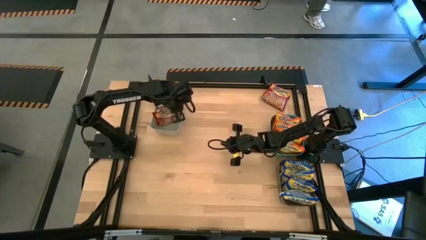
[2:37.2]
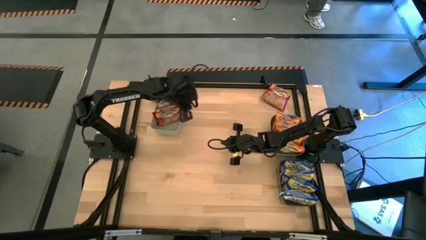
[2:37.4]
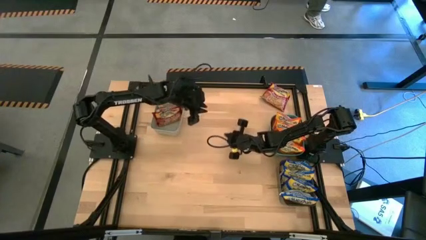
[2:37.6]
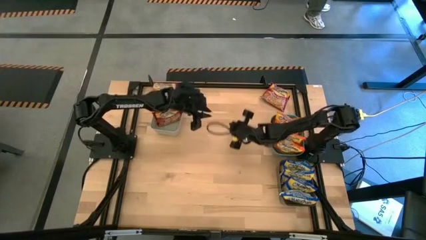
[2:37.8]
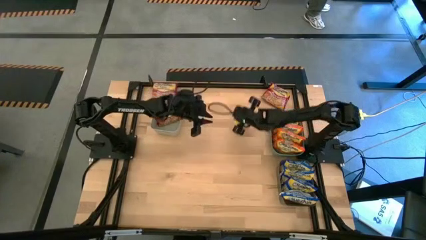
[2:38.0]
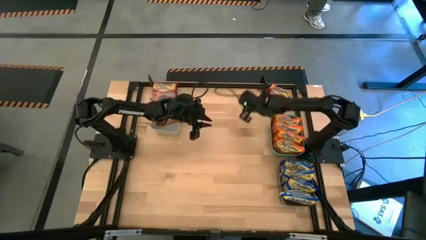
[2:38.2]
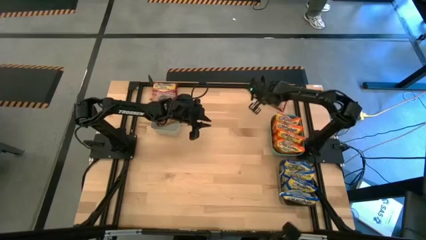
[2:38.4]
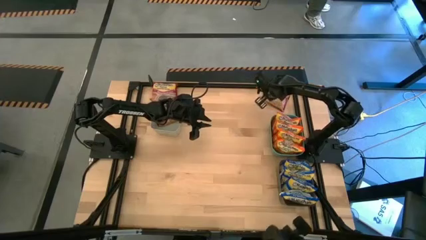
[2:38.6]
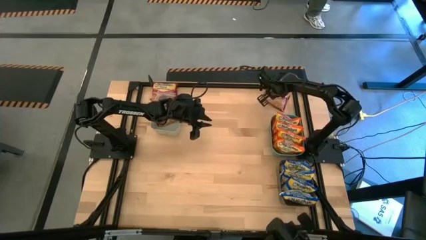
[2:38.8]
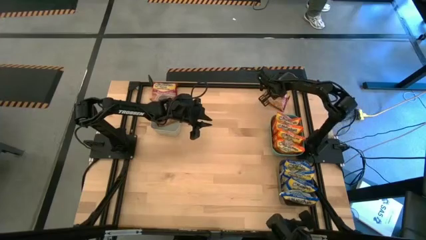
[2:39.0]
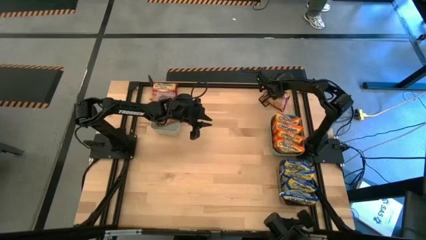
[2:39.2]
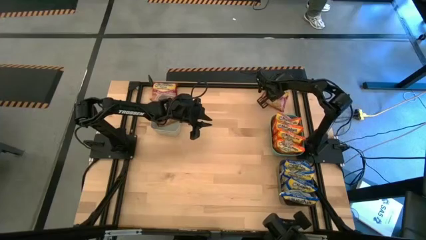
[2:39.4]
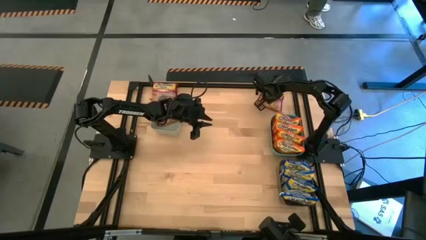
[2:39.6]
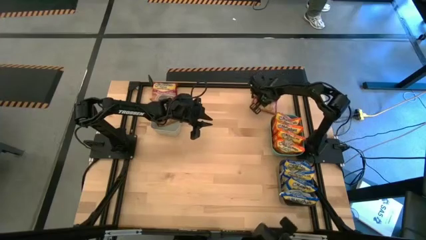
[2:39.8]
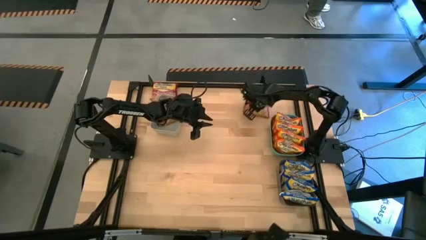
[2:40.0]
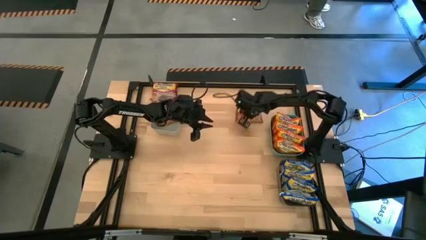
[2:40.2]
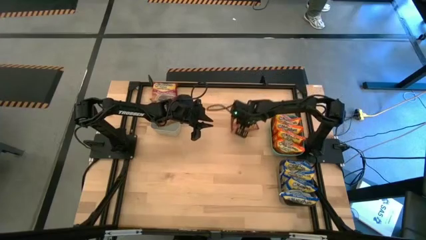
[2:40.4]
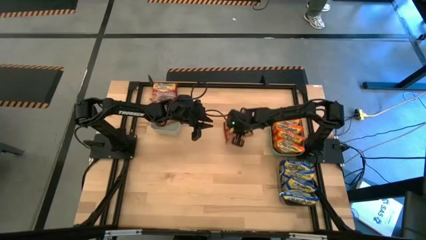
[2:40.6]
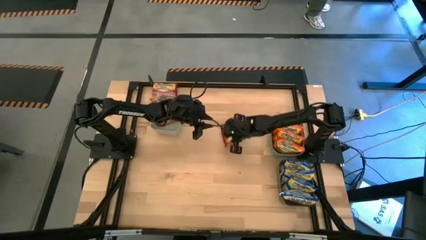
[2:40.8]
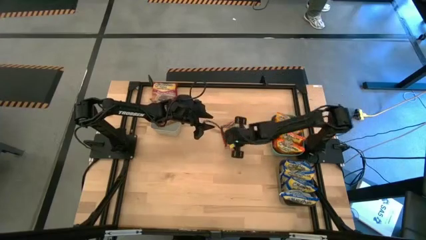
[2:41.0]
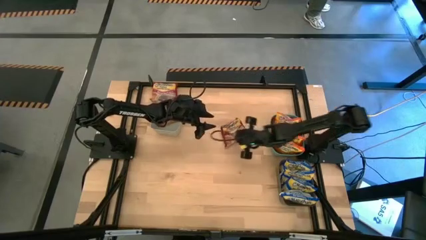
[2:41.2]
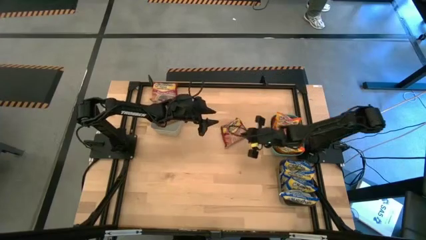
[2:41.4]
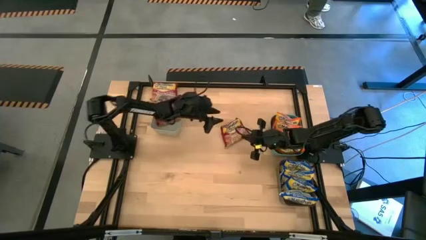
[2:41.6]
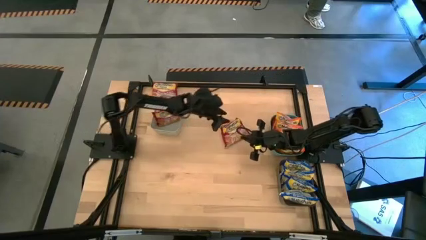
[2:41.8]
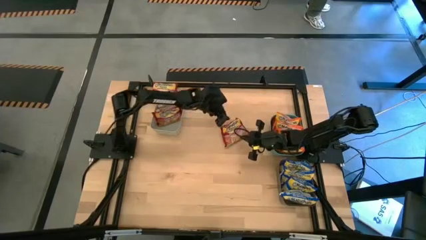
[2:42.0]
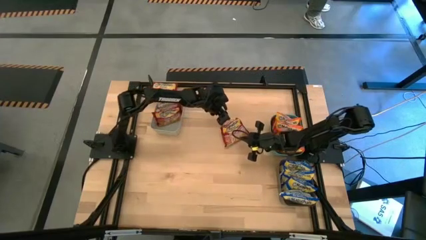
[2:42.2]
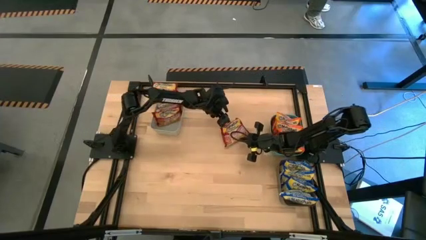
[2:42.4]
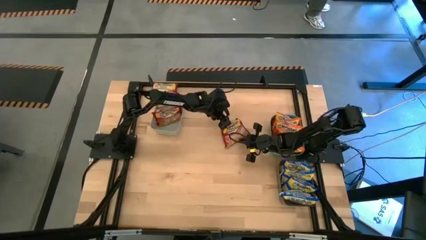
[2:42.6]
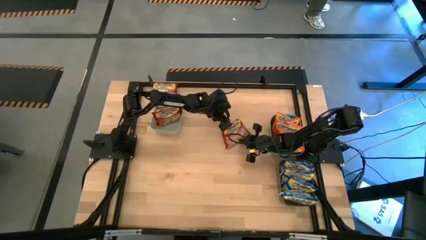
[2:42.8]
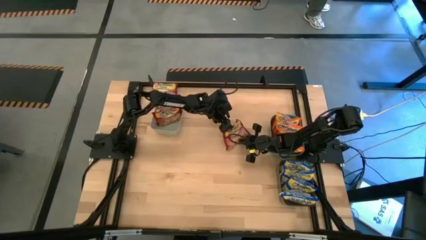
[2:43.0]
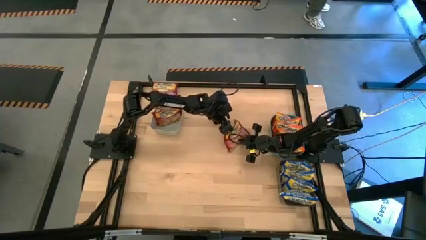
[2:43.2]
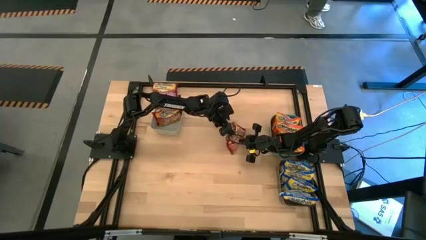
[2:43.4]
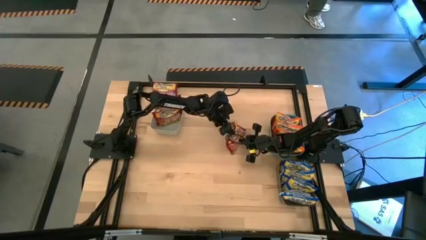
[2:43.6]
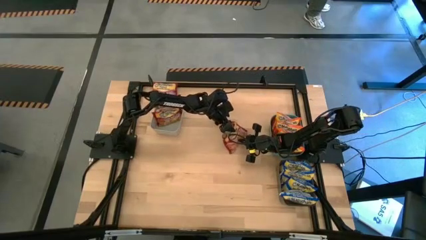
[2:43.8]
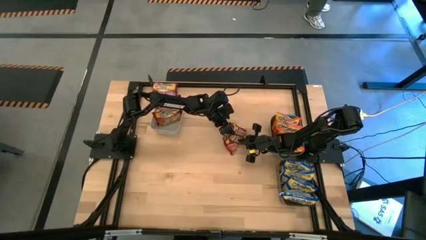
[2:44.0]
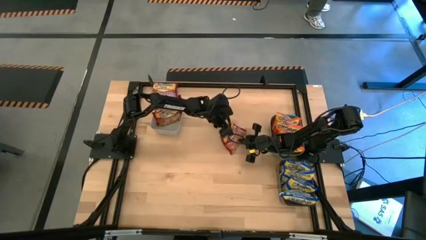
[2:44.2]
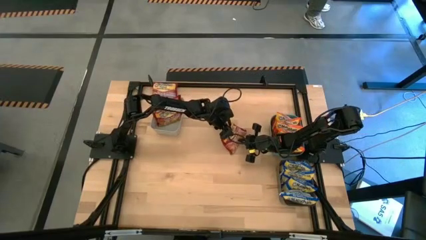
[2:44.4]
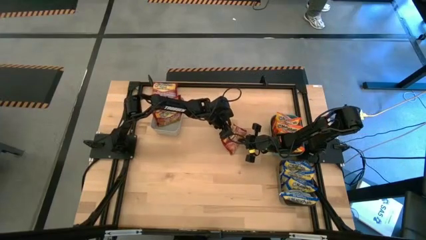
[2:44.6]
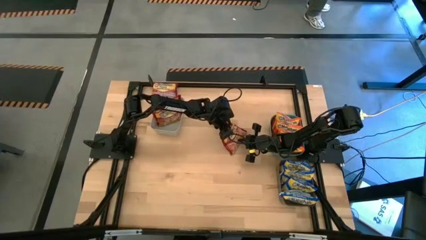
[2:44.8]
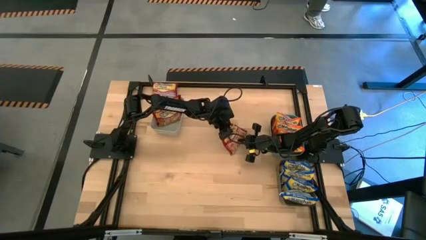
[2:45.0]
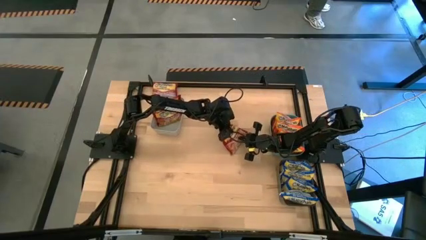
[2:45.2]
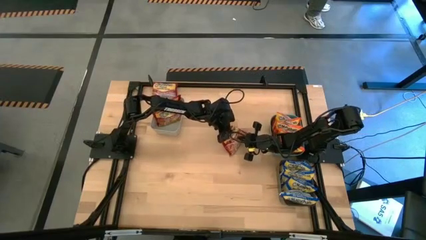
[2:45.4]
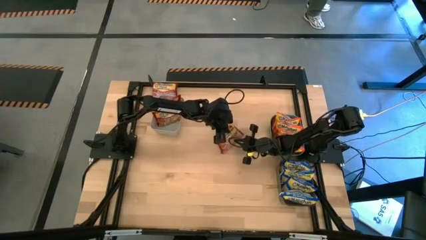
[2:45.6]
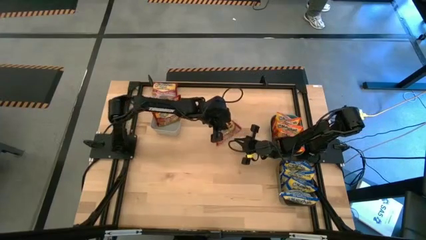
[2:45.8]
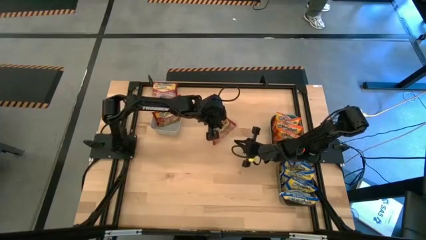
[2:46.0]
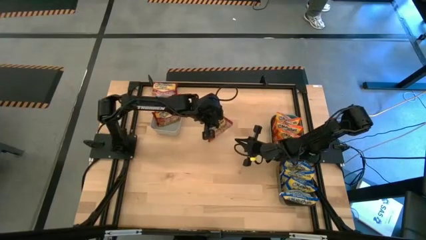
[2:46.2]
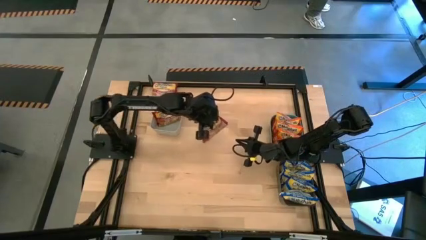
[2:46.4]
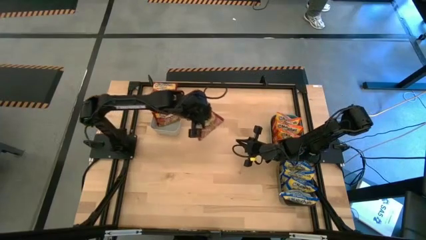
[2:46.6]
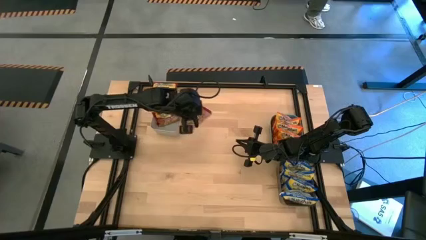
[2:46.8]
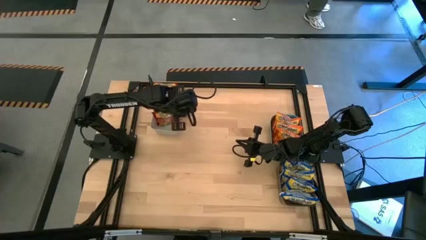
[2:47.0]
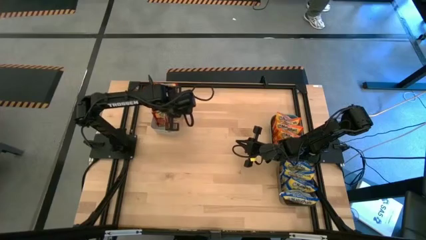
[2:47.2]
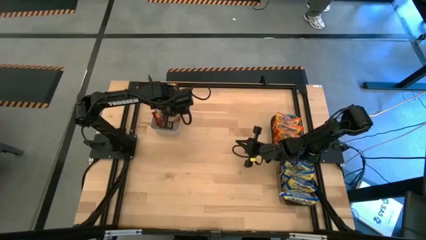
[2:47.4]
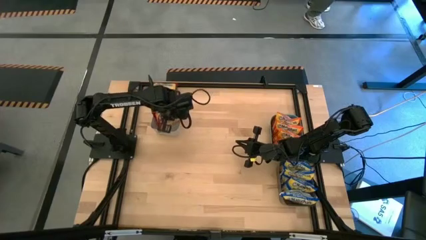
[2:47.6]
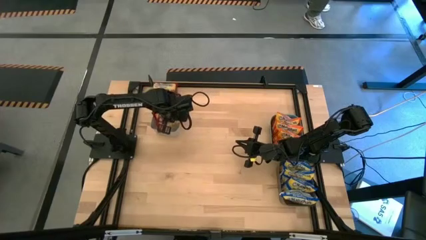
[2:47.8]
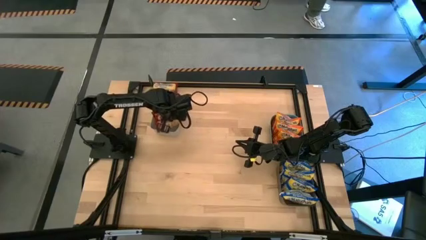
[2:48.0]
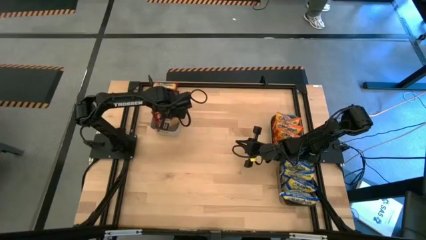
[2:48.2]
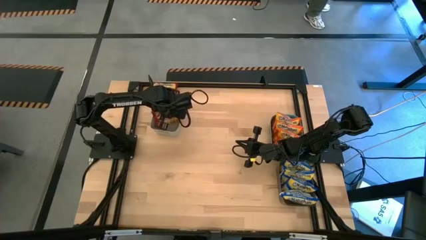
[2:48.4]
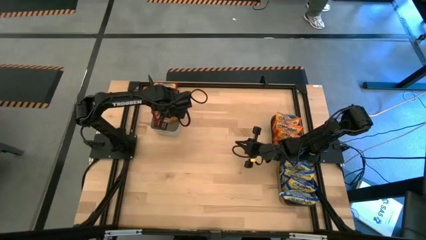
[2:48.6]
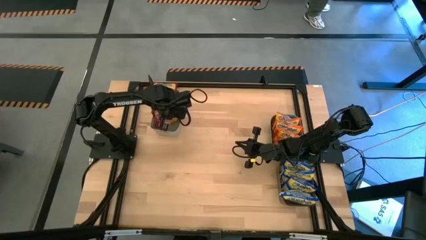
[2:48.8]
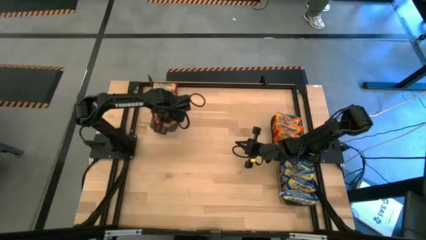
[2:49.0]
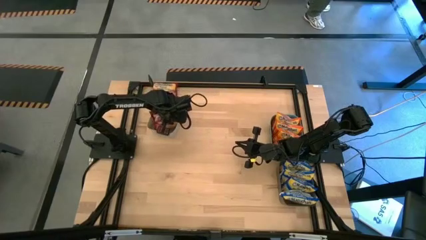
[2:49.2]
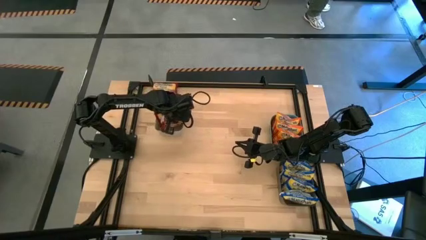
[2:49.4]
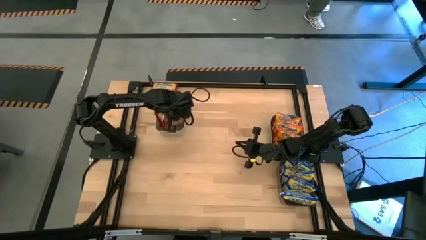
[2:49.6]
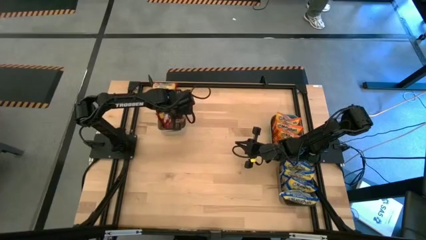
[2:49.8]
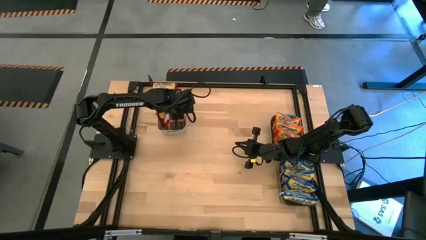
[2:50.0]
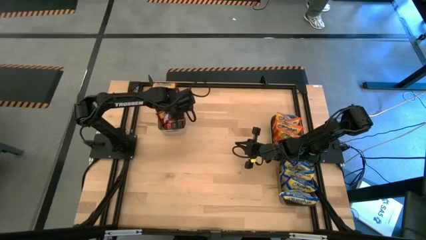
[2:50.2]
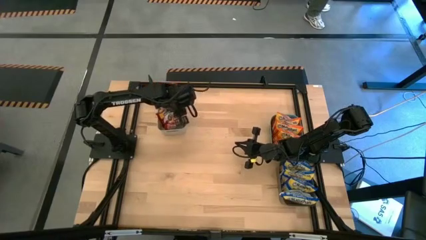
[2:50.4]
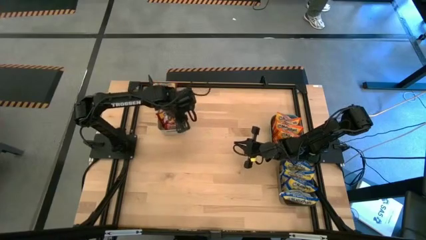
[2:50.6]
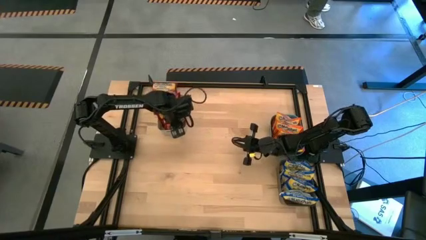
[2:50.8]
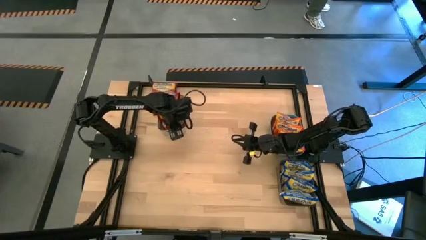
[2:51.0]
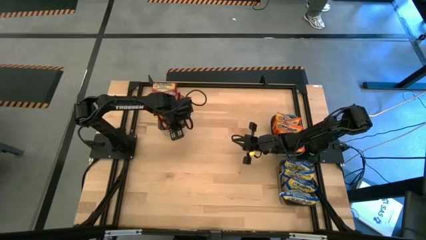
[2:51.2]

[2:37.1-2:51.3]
Task: Sort Maruchan noodles
Put the red noodle pack into the white bin

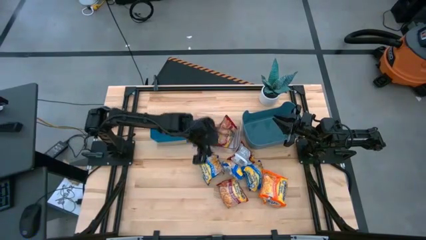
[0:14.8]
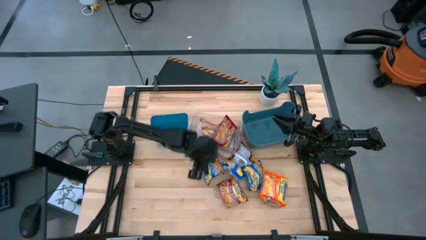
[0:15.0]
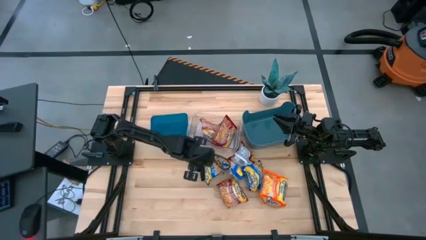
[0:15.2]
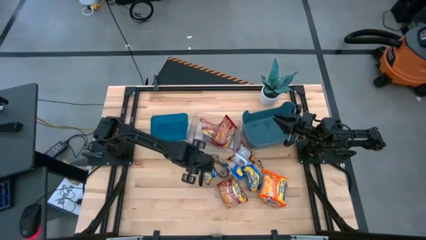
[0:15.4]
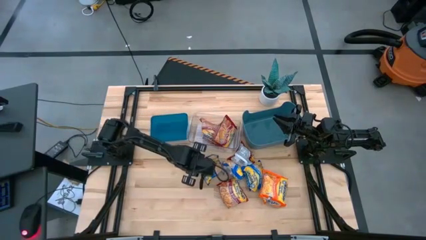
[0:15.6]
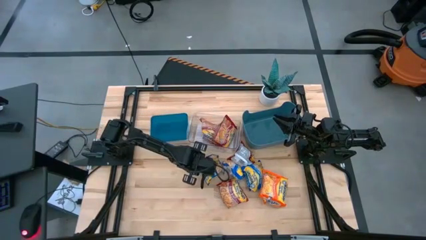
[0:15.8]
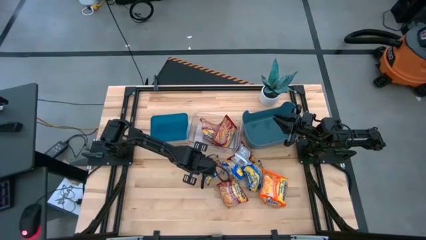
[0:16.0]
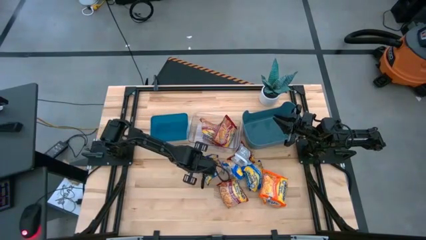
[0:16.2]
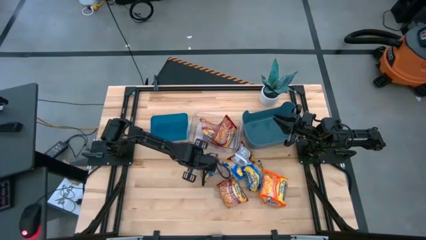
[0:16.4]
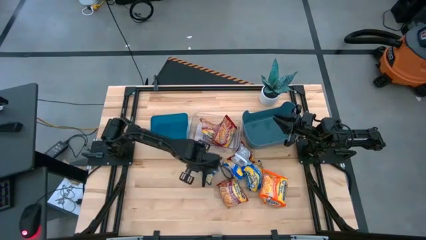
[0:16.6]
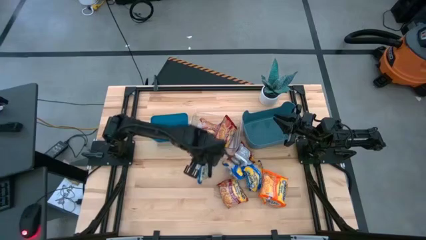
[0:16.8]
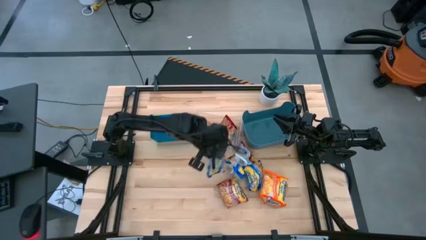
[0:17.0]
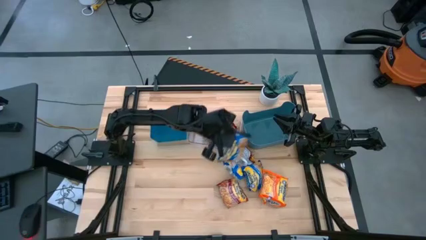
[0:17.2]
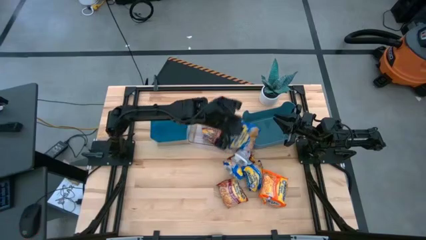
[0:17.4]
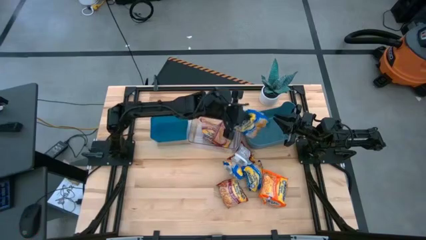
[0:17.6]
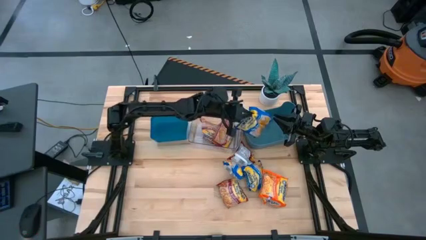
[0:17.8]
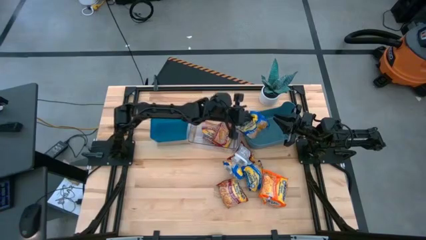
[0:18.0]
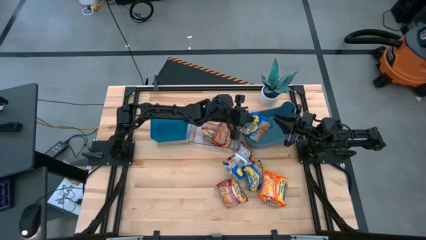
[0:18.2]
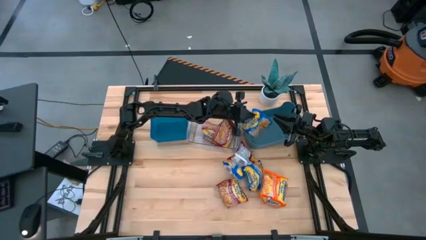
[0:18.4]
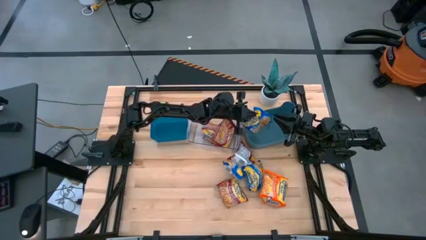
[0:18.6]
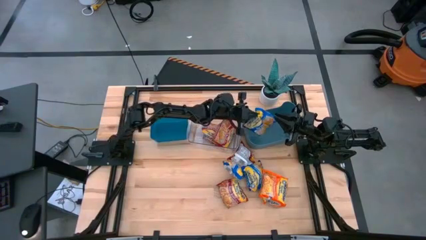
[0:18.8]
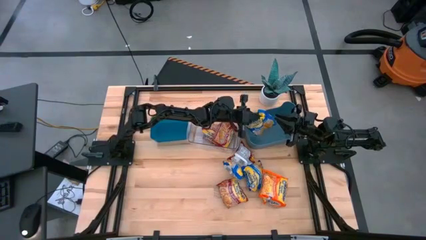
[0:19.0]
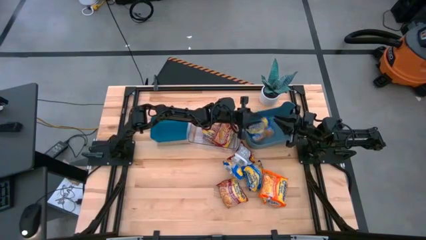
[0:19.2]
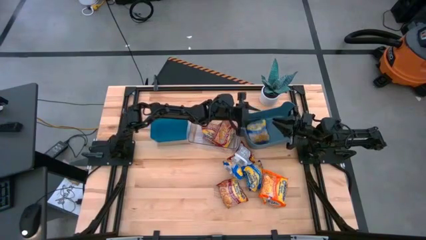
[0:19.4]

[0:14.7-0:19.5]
Task: Sort Maruchan noodles
Put the blue noodle pack into the right blue bin
